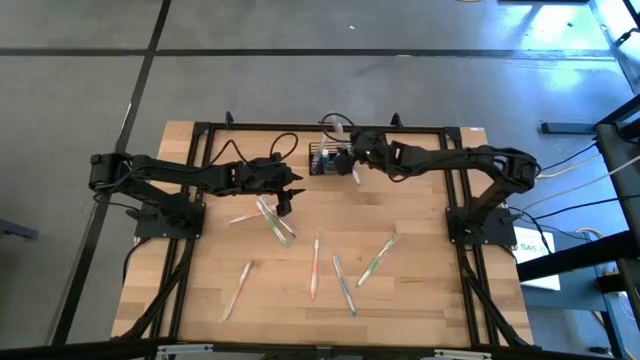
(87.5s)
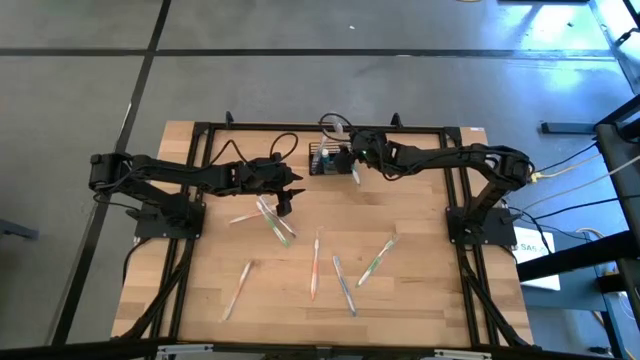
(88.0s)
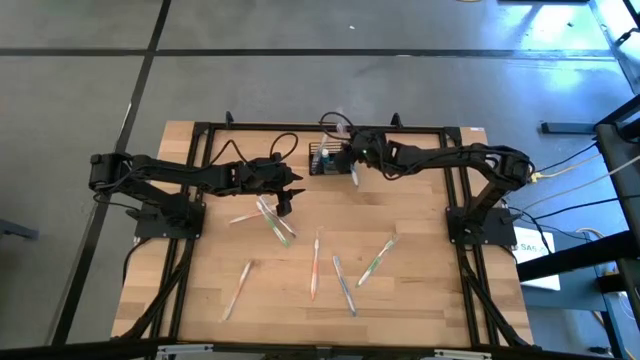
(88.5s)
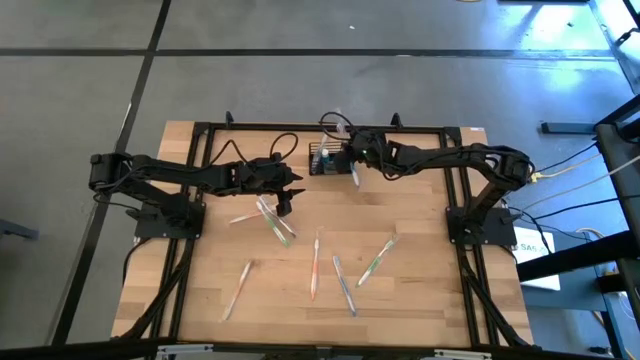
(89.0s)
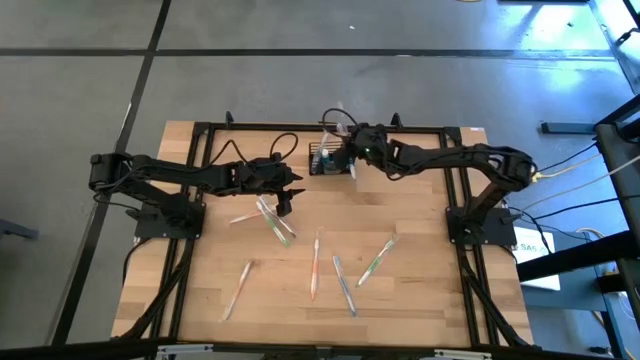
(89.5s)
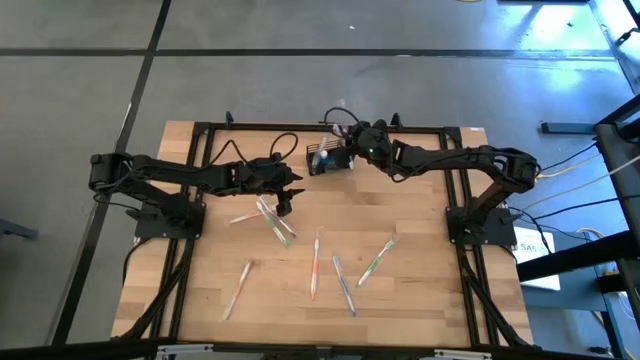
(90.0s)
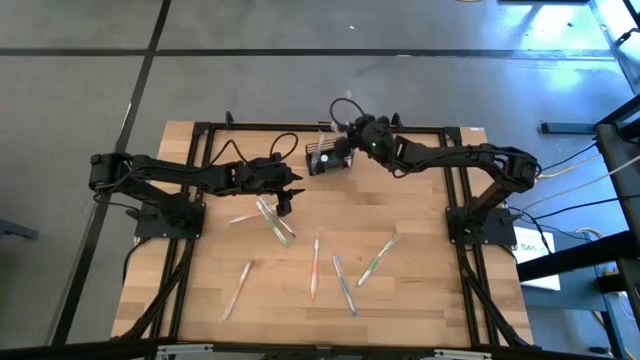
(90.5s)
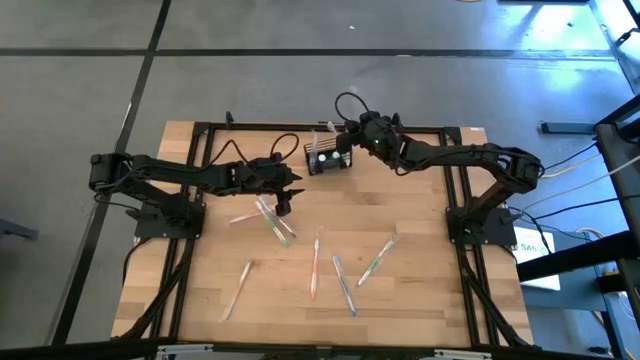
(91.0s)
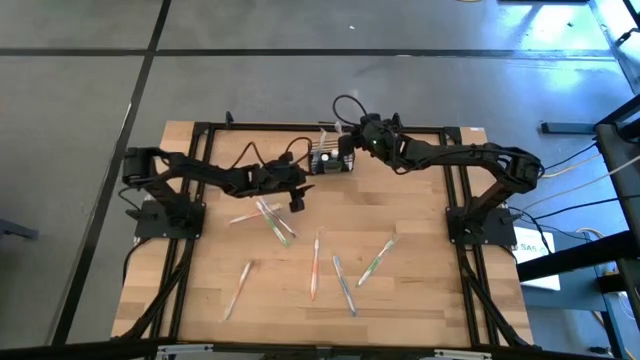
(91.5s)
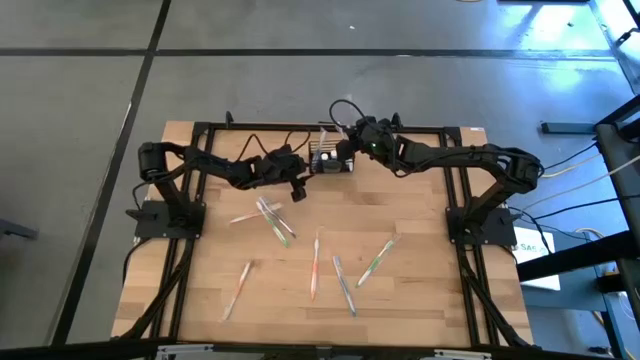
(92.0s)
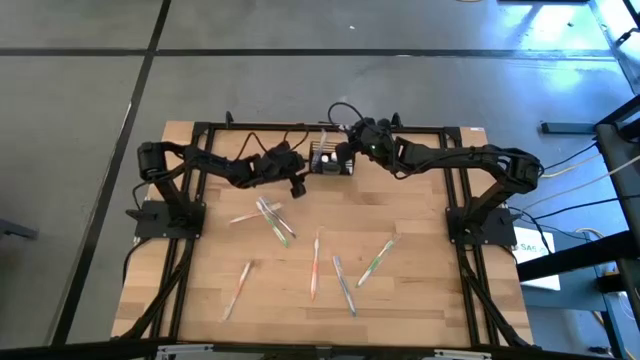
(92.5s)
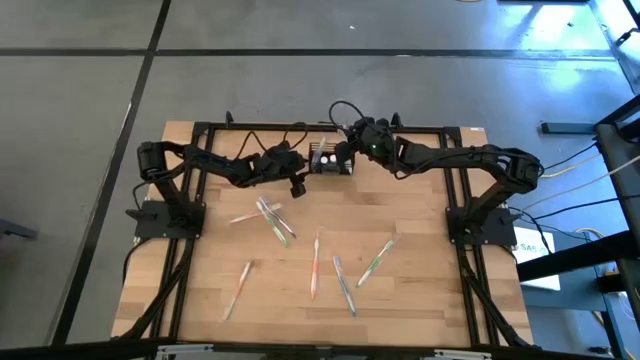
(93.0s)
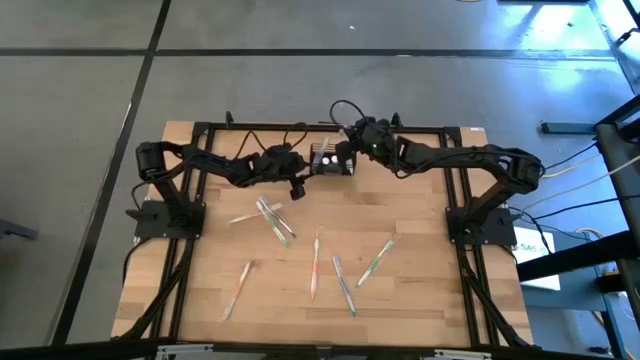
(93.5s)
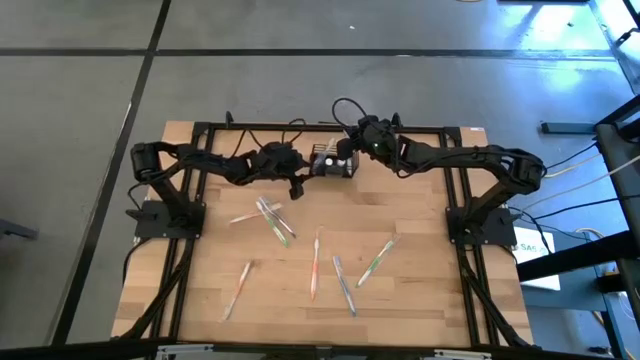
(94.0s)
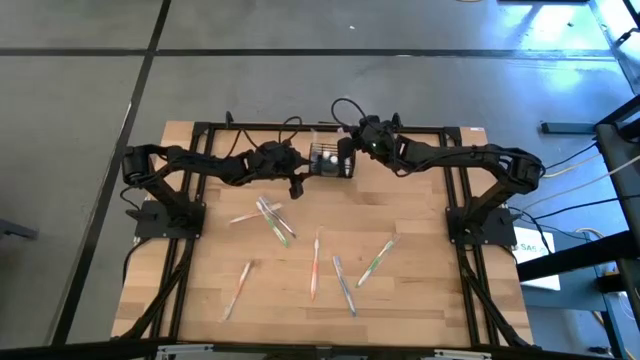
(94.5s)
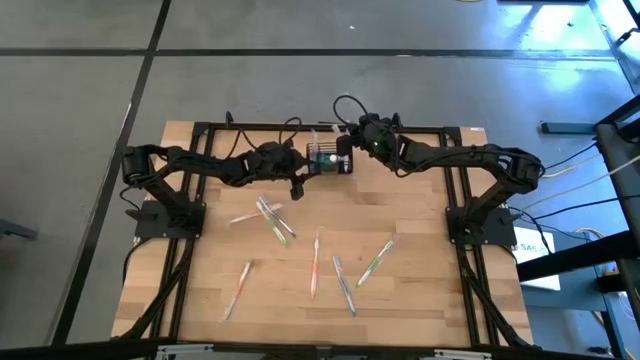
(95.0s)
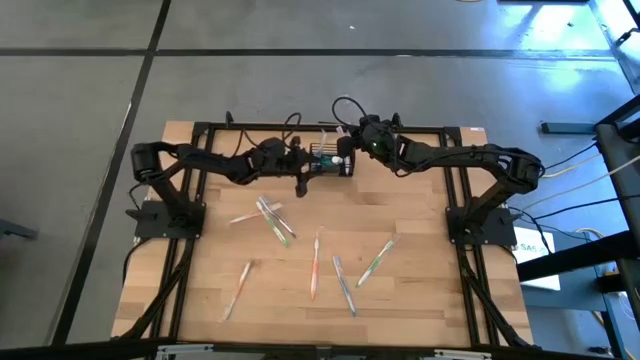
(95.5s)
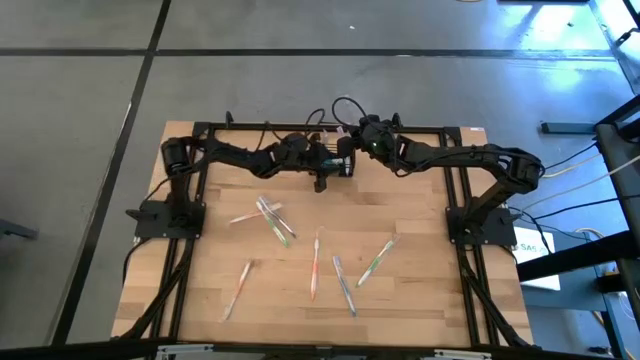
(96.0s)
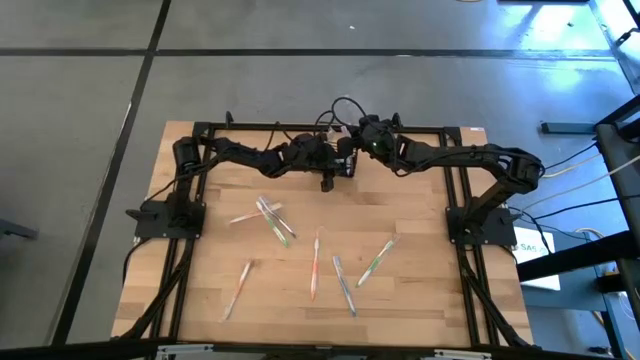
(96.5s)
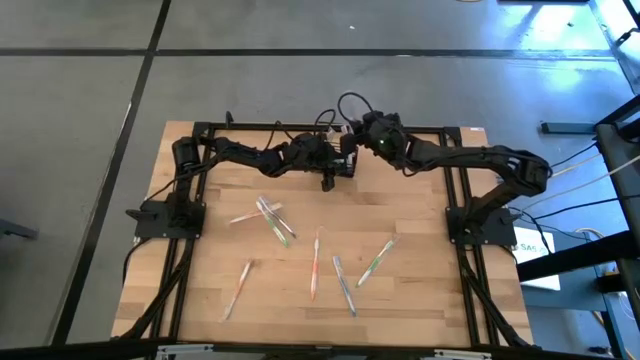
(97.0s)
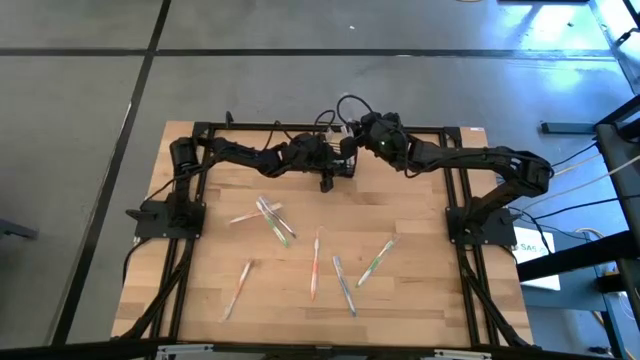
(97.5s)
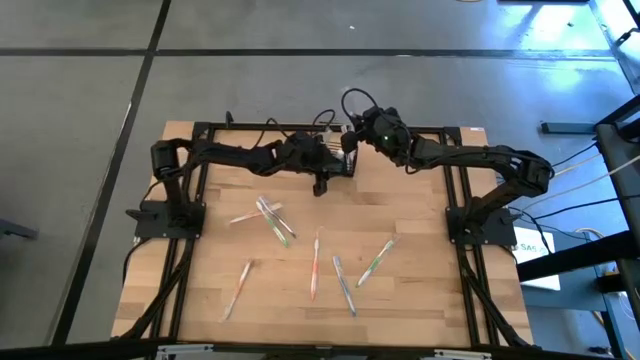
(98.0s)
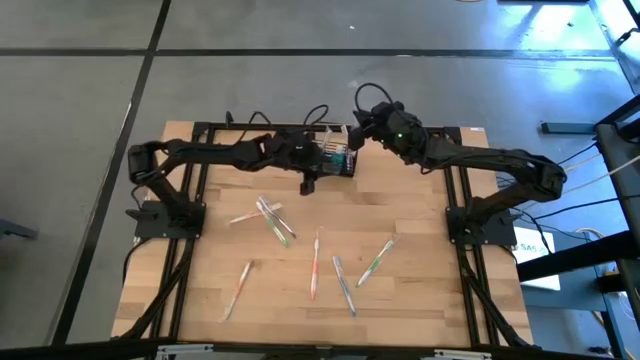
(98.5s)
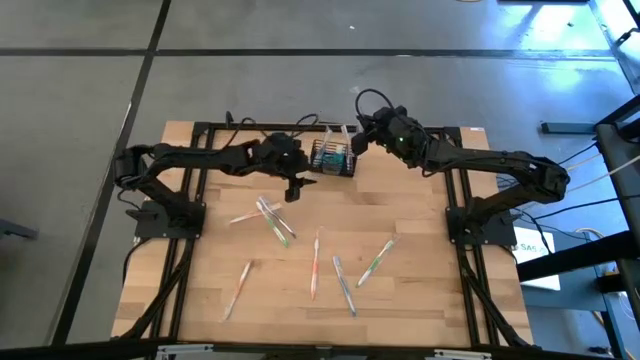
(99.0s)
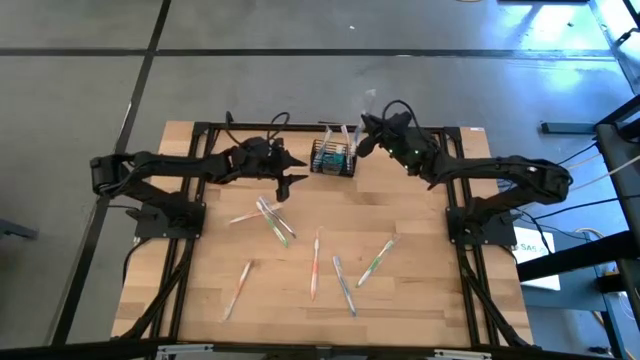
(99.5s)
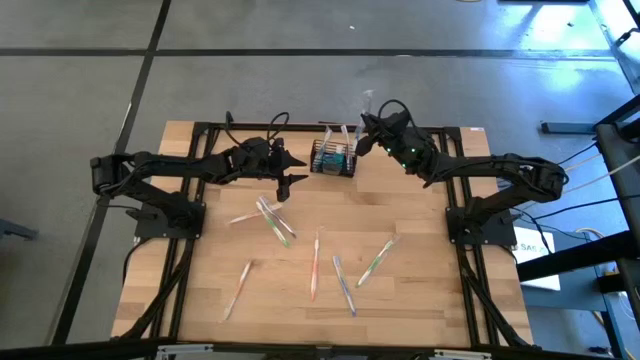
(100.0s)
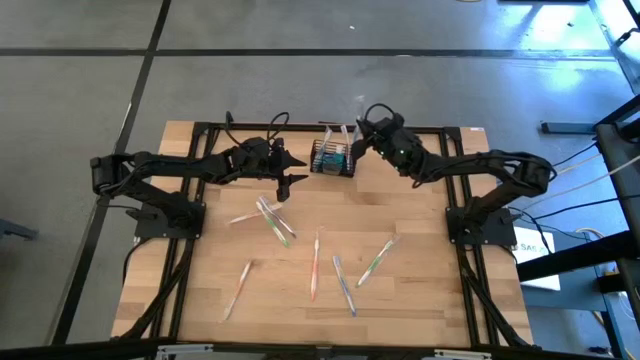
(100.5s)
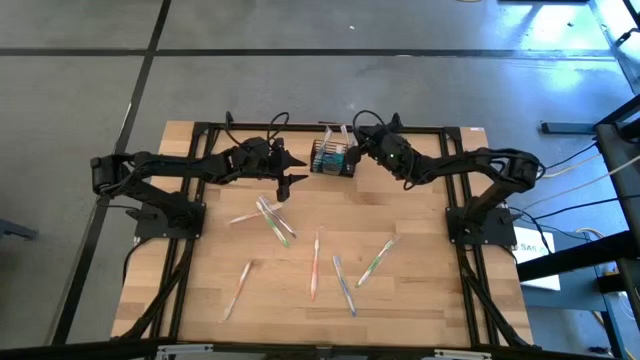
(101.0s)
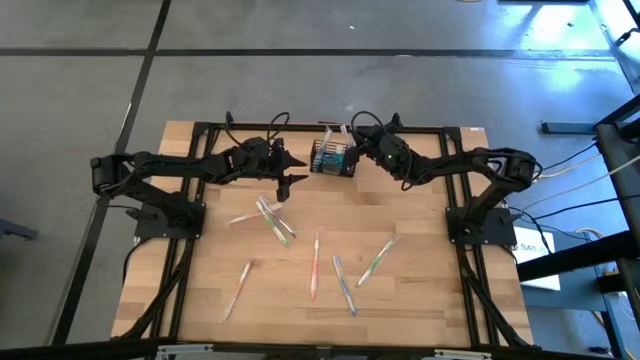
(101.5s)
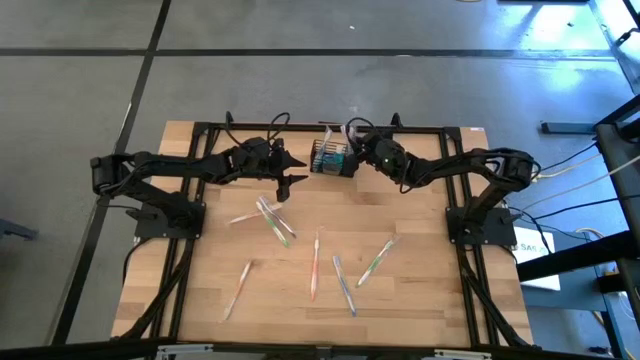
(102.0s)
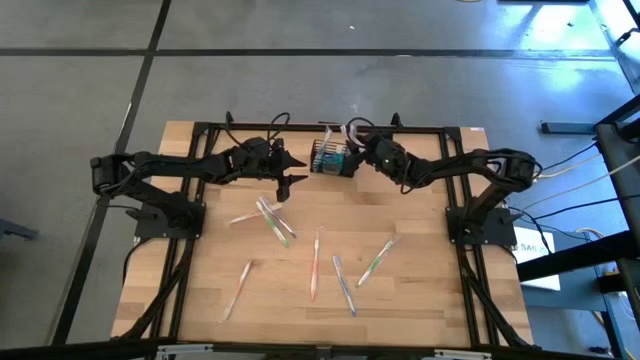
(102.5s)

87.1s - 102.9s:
Task: Pick & Place toothbrushing station
Put the right blue toothbrush in the right section of the wire organizer

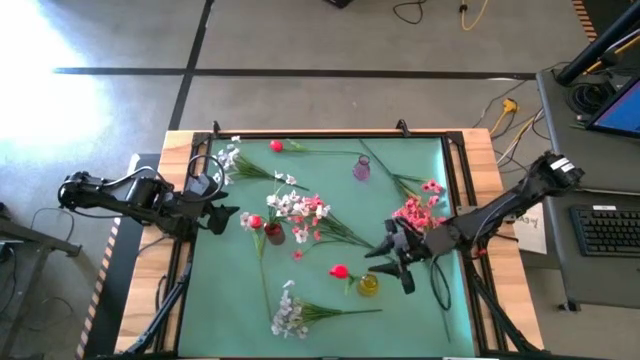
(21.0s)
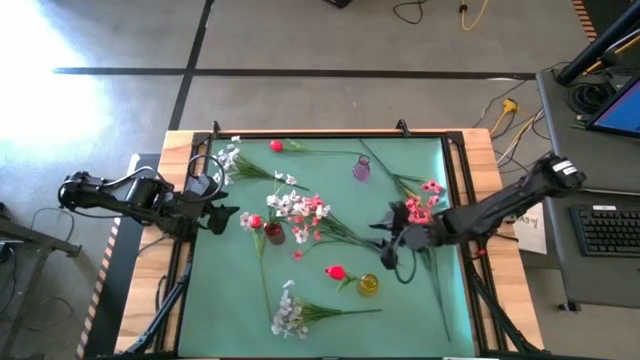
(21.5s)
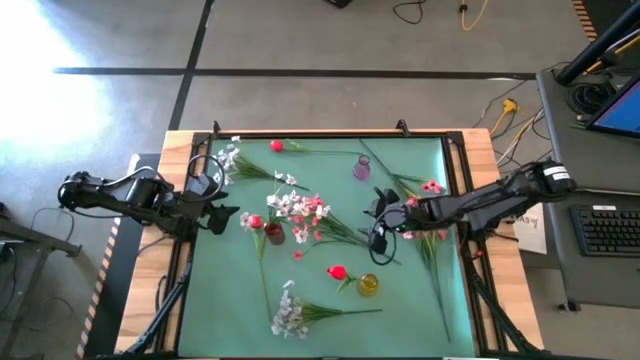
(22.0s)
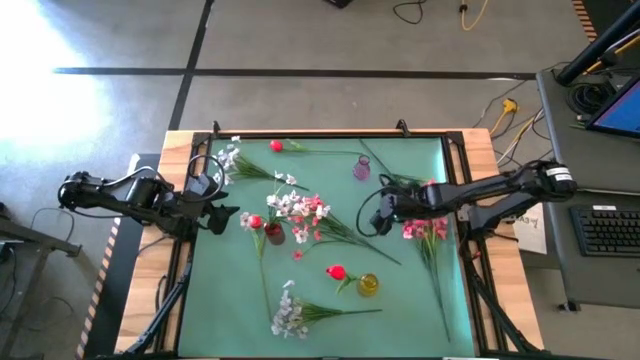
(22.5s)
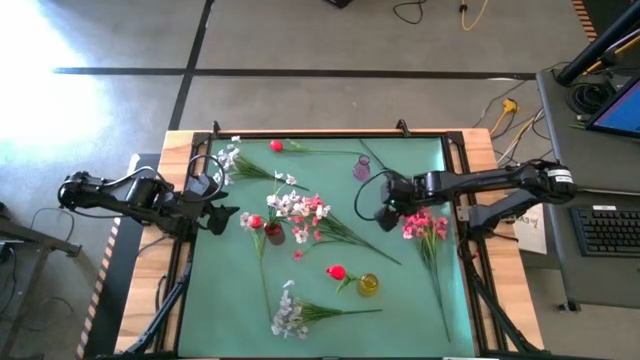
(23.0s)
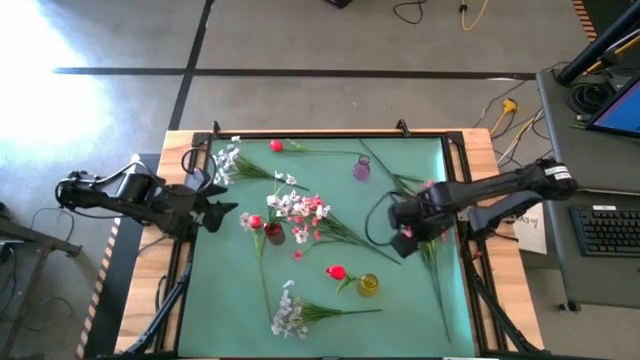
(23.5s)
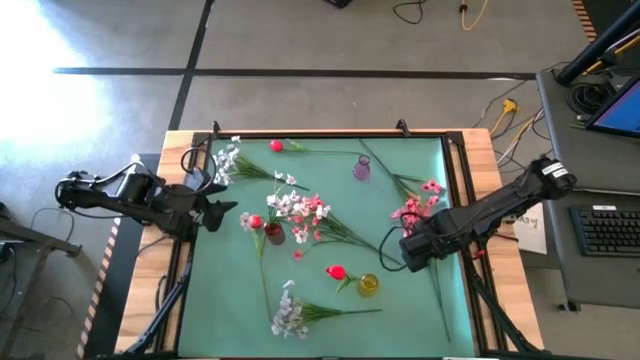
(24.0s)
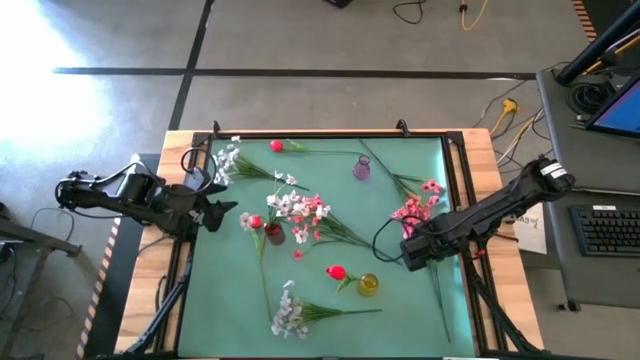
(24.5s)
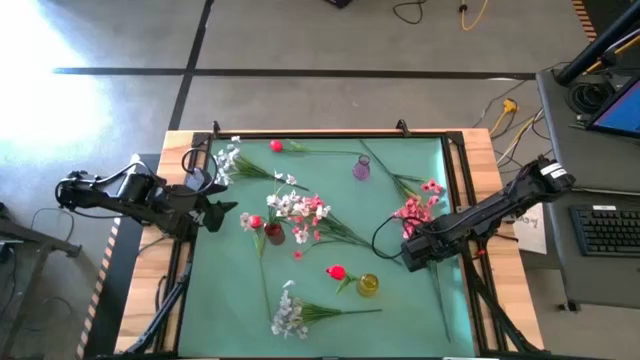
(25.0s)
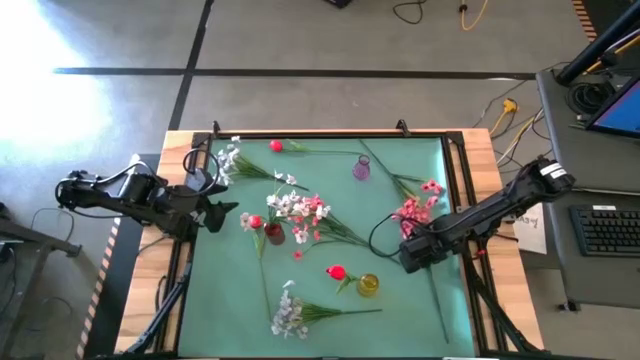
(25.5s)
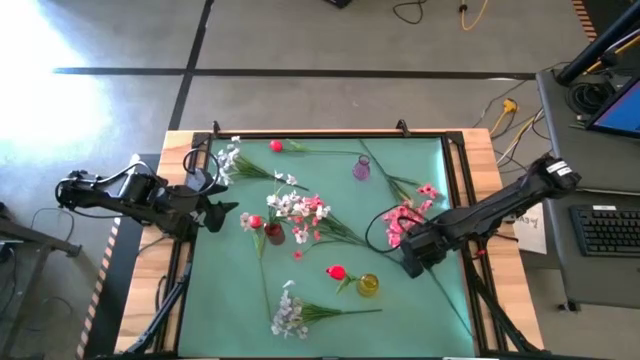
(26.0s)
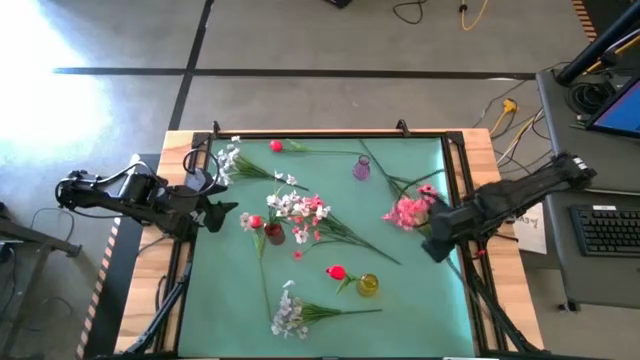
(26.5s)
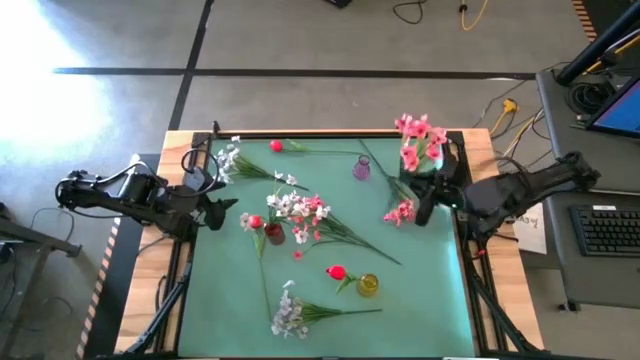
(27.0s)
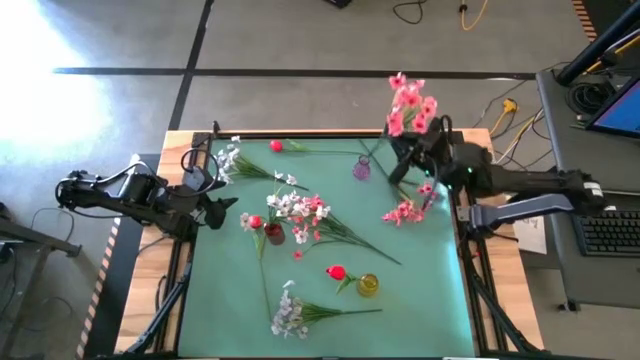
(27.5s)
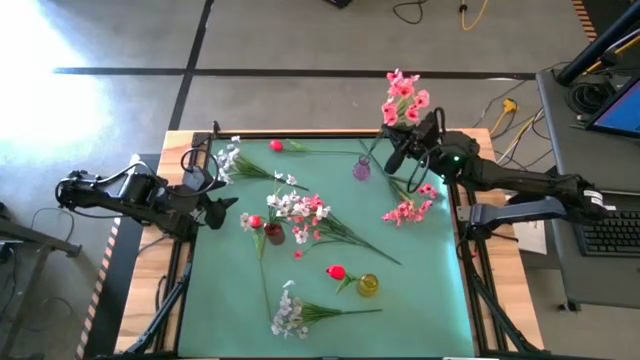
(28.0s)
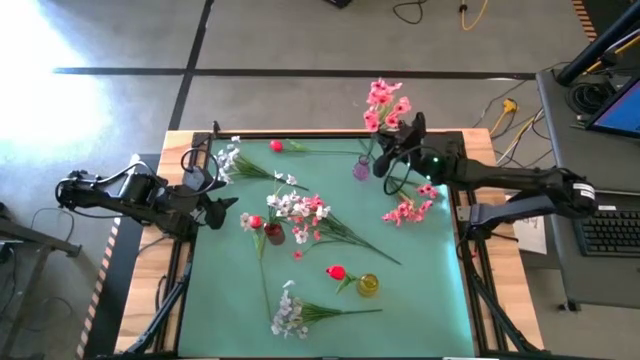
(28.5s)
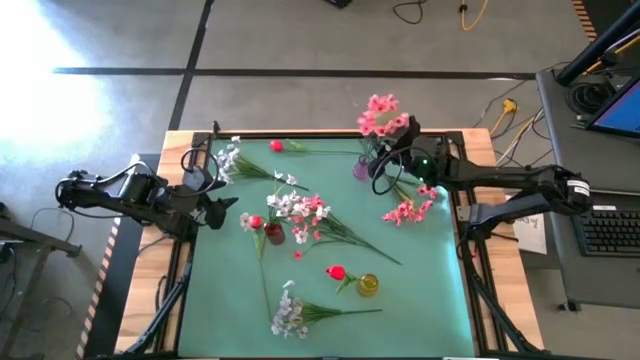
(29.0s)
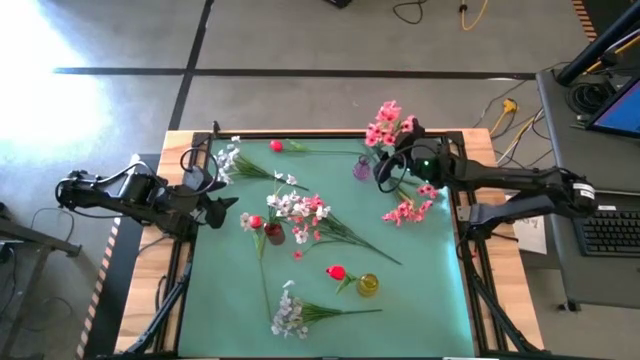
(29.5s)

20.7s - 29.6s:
Task: Sort flowers into vase by color
Put the bottom pink flower into the purple flower vase
